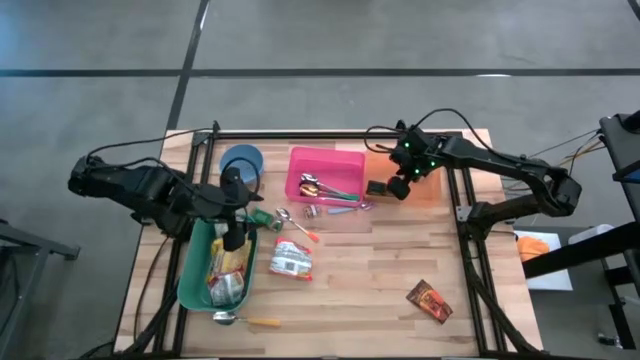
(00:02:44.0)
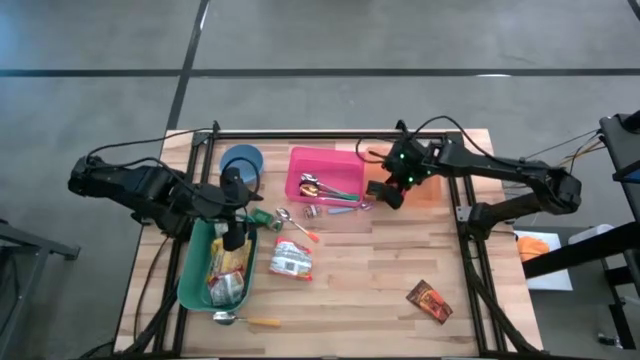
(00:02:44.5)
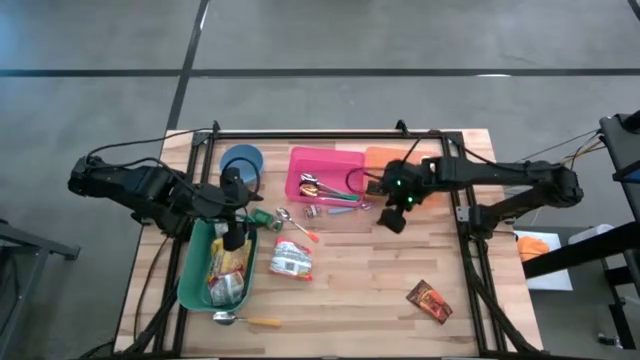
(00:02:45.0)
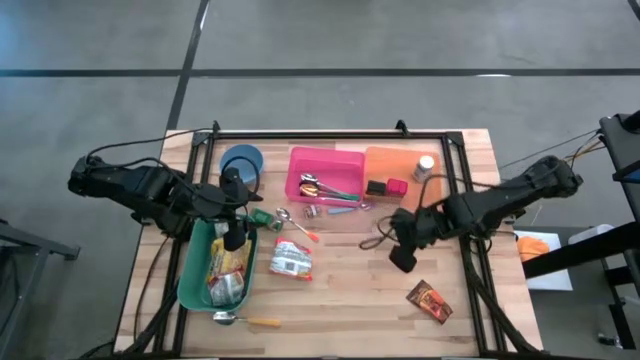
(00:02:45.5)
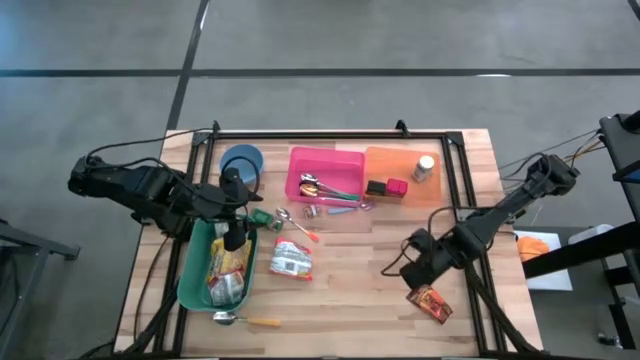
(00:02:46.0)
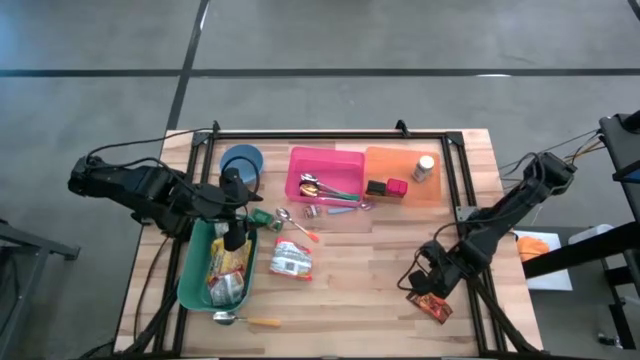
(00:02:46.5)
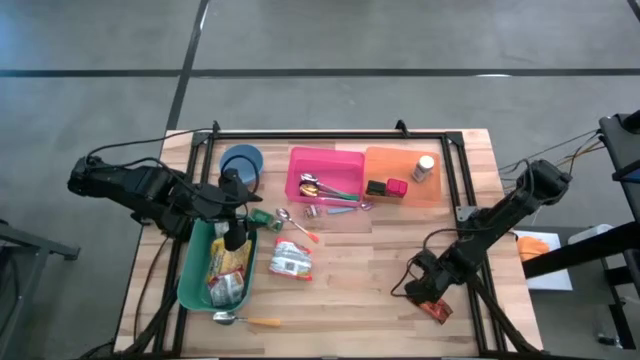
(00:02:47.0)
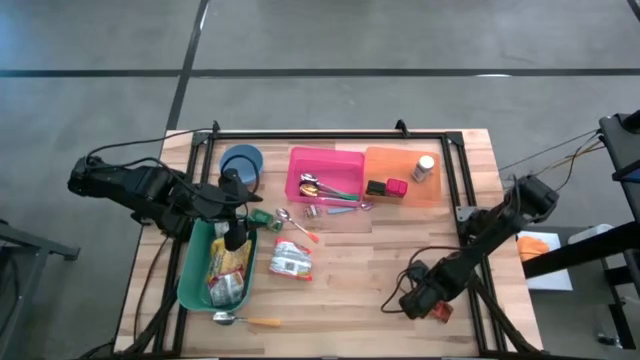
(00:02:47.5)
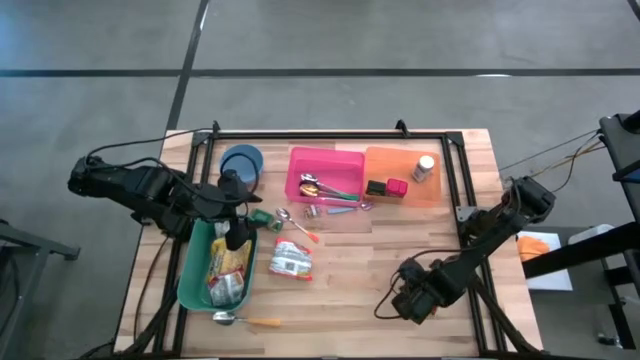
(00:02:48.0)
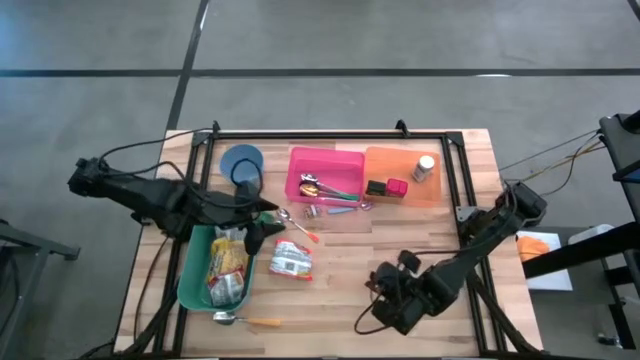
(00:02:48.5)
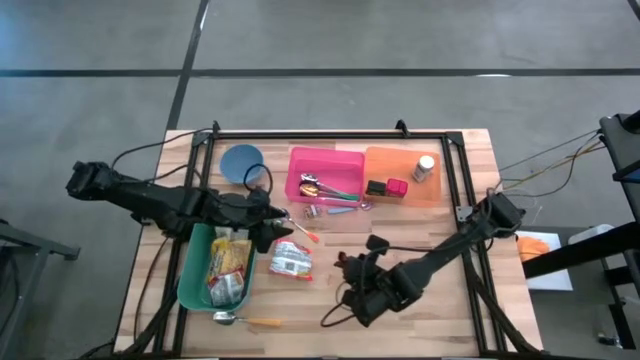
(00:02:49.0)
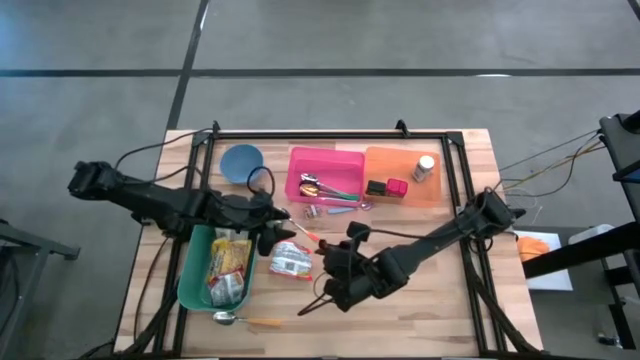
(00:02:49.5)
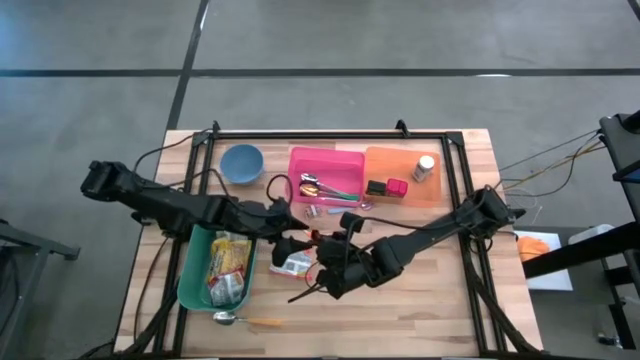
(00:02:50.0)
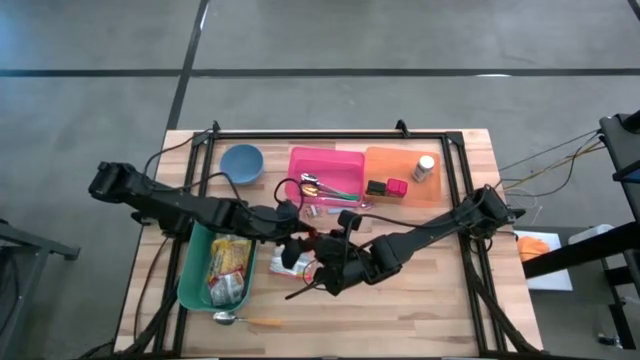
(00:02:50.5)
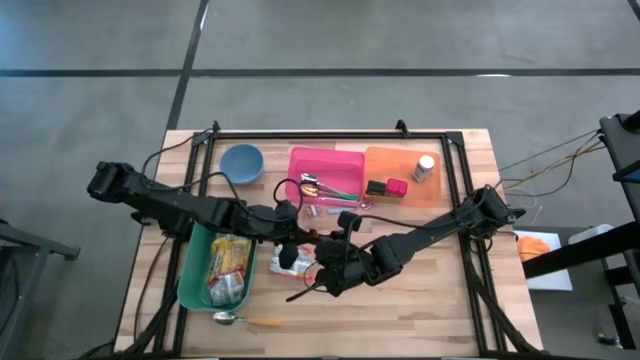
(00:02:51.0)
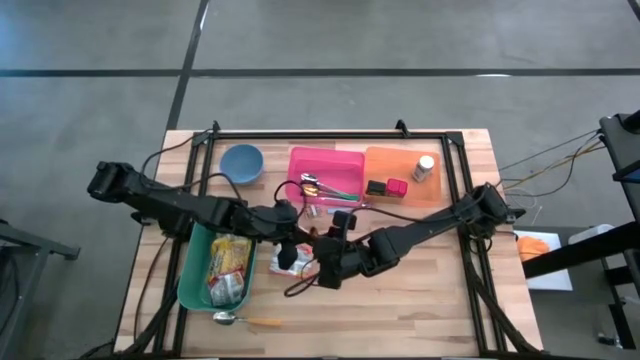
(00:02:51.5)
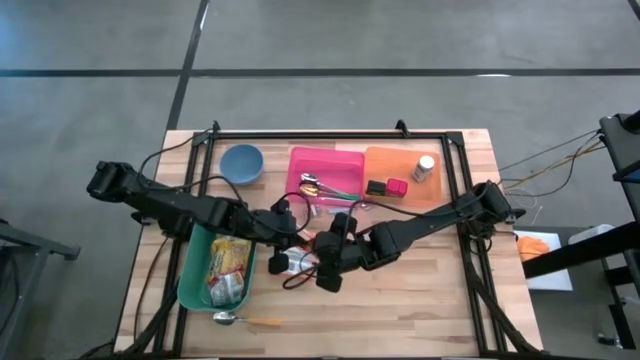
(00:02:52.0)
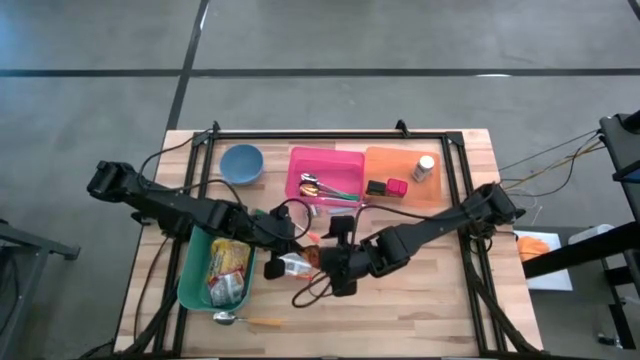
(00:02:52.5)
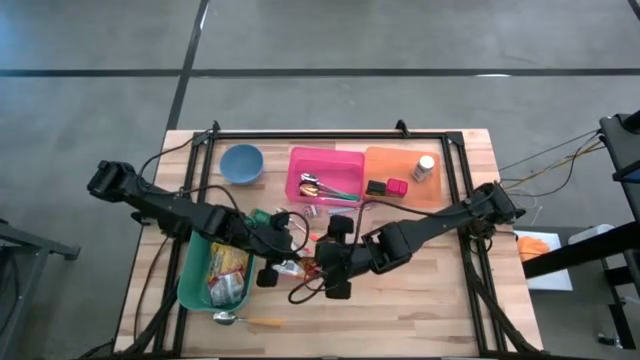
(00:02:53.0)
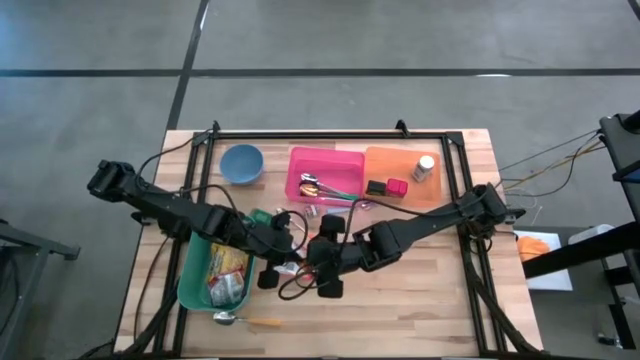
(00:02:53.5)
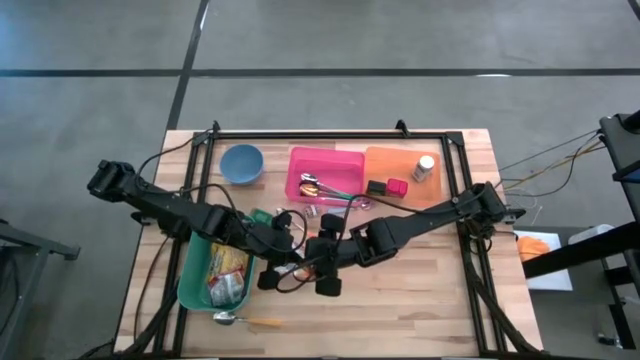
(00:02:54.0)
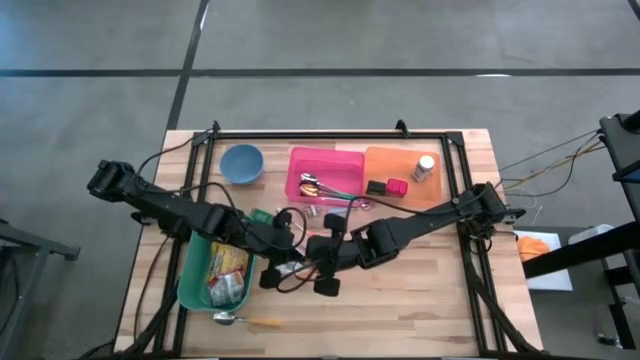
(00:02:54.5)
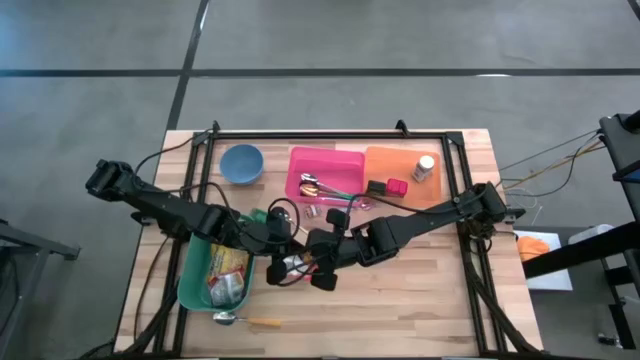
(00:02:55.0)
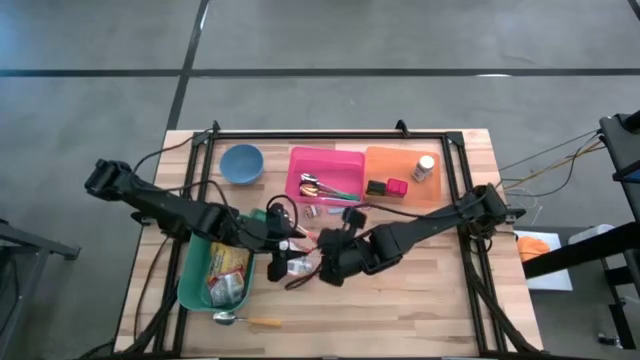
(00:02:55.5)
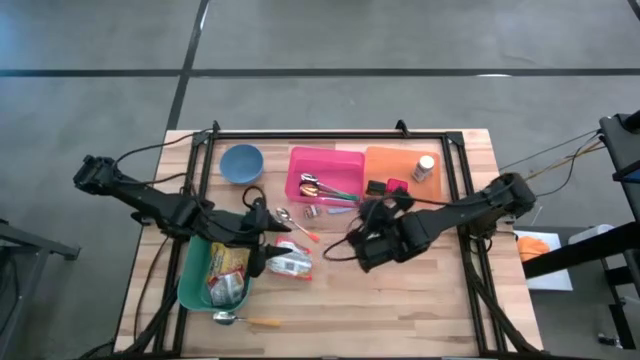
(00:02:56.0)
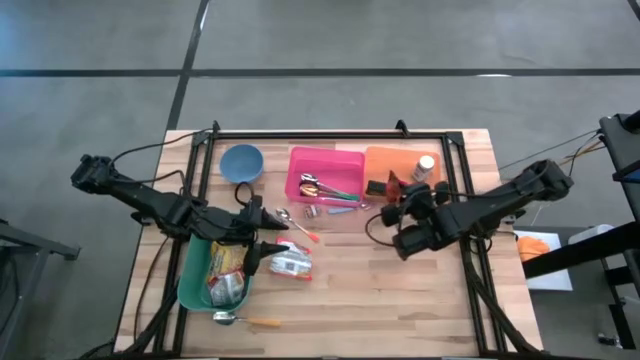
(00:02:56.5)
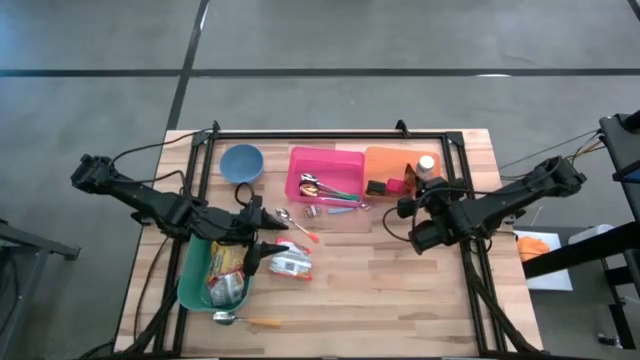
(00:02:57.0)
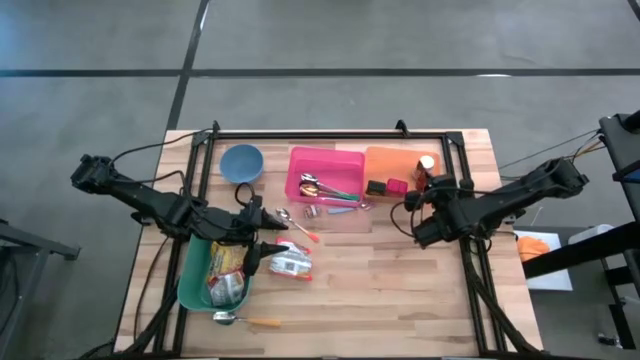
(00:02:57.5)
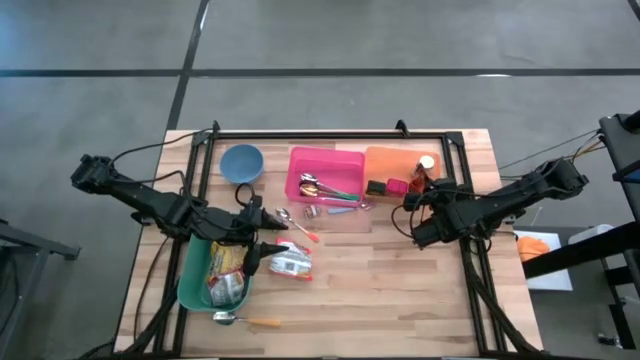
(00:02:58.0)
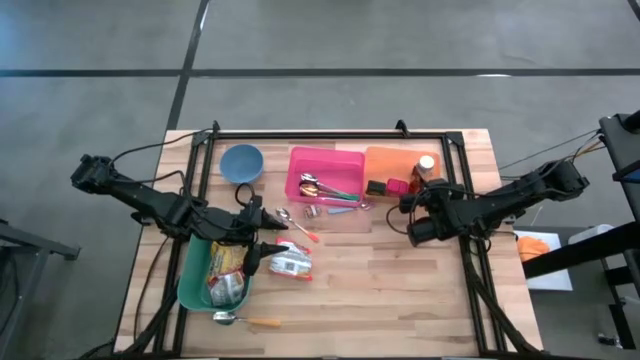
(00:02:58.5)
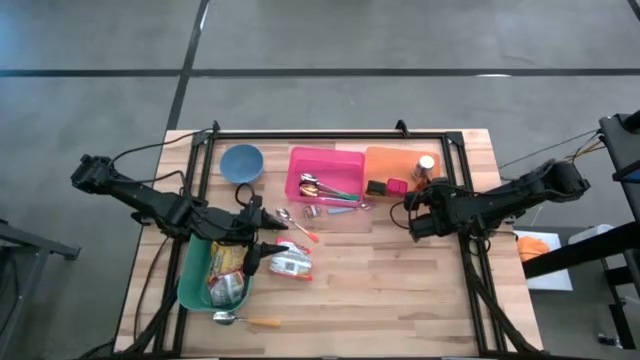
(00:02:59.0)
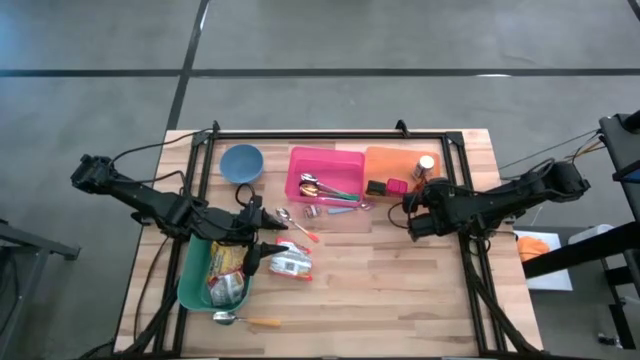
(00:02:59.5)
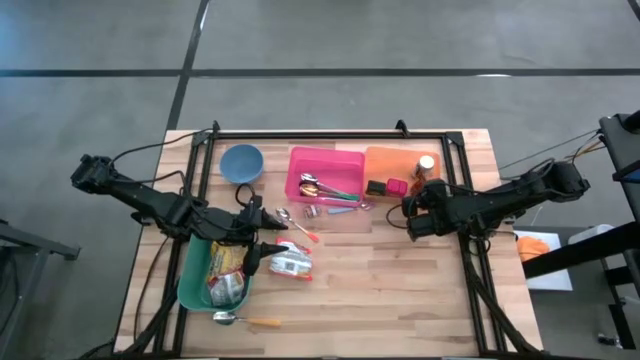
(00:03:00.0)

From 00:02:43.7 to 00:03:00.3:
Put the orange spice pack into the orange bin
